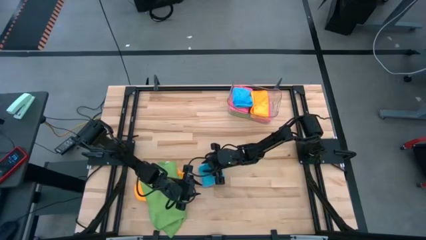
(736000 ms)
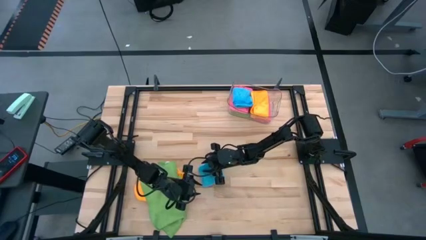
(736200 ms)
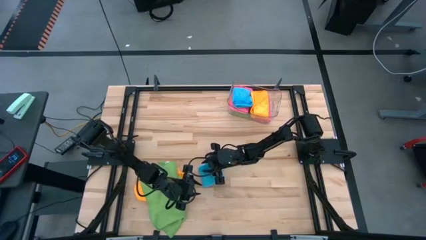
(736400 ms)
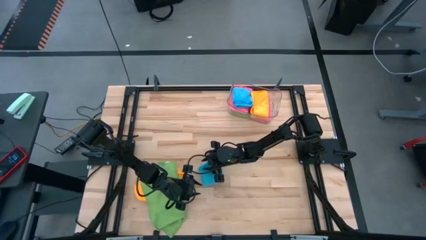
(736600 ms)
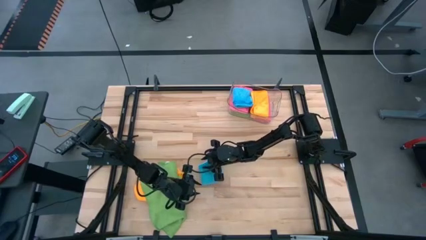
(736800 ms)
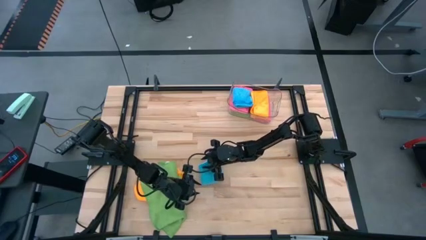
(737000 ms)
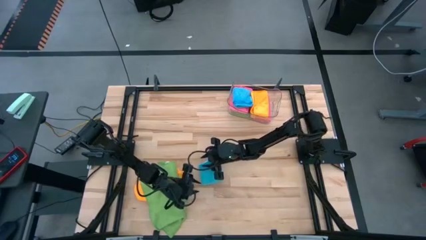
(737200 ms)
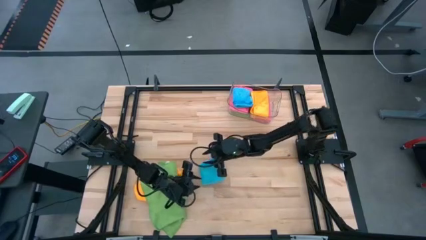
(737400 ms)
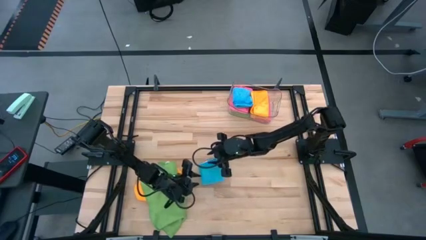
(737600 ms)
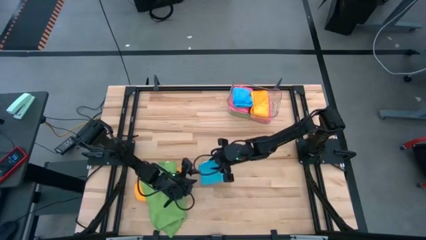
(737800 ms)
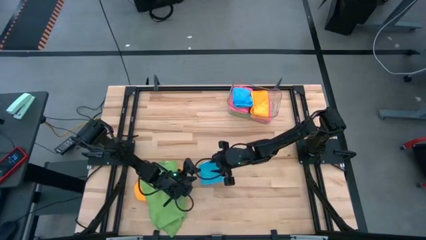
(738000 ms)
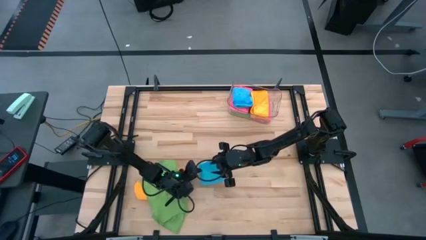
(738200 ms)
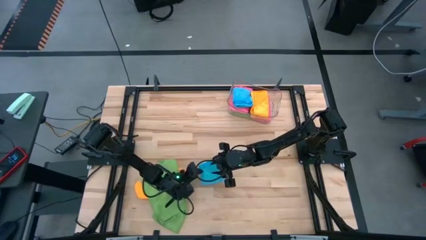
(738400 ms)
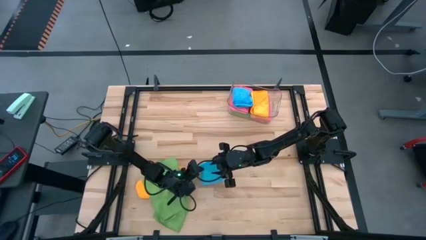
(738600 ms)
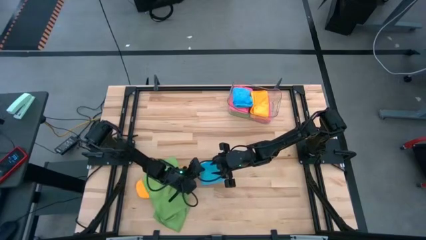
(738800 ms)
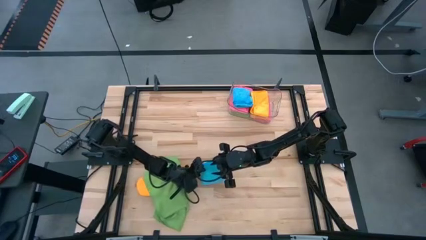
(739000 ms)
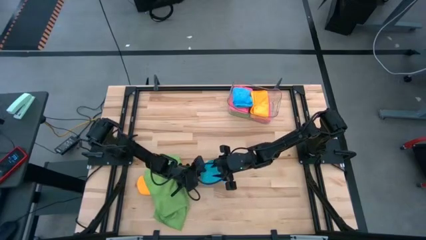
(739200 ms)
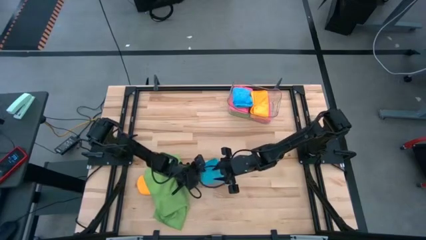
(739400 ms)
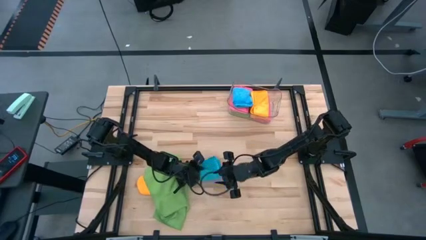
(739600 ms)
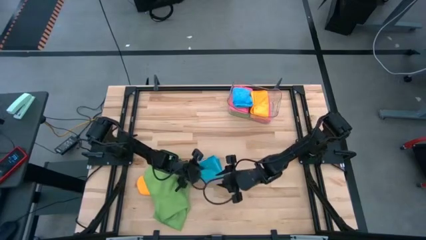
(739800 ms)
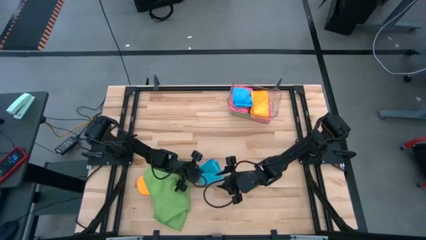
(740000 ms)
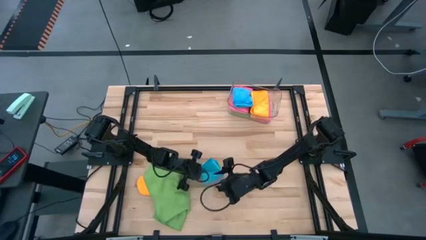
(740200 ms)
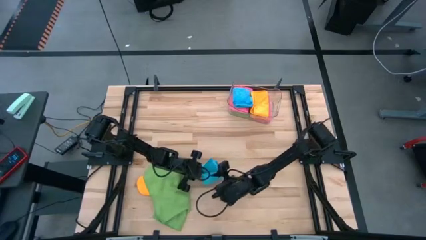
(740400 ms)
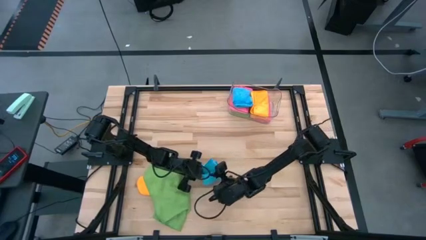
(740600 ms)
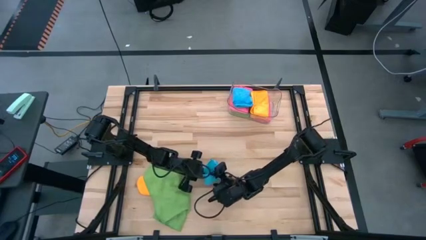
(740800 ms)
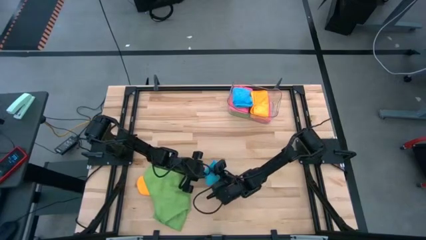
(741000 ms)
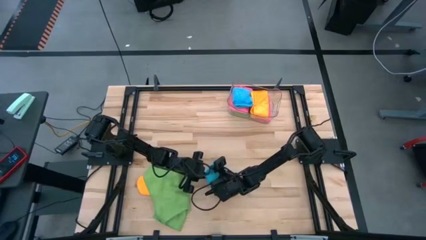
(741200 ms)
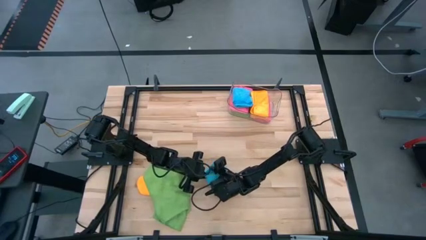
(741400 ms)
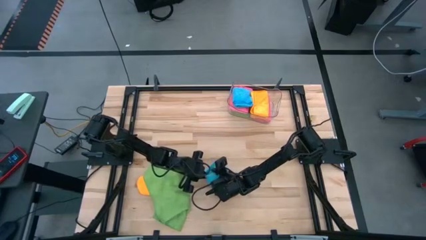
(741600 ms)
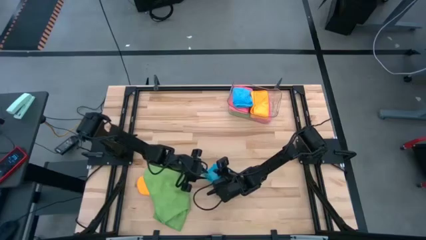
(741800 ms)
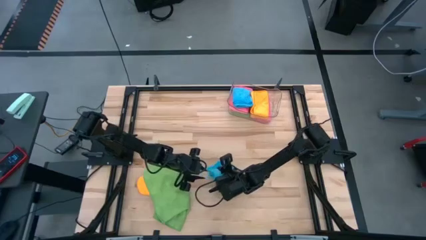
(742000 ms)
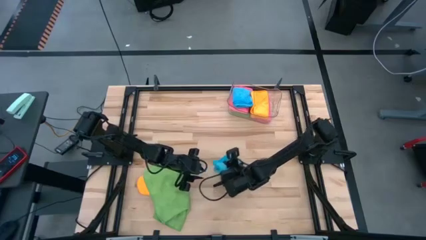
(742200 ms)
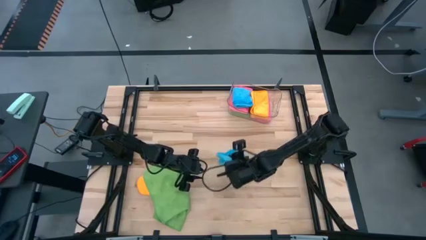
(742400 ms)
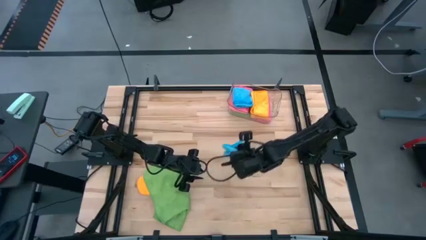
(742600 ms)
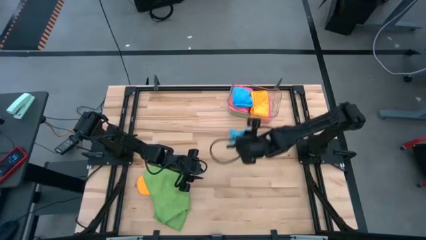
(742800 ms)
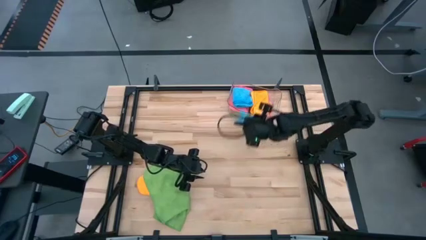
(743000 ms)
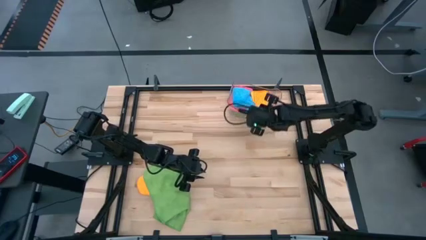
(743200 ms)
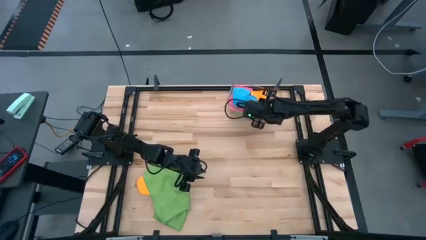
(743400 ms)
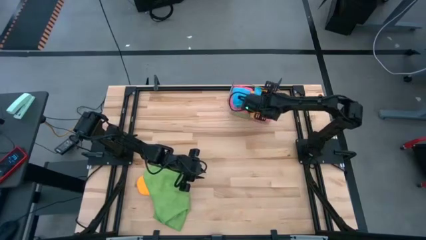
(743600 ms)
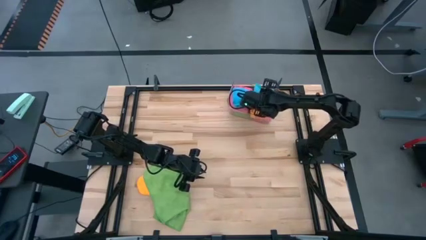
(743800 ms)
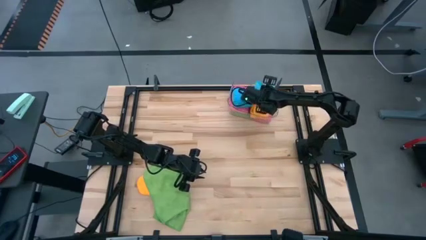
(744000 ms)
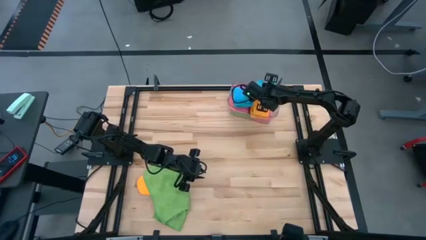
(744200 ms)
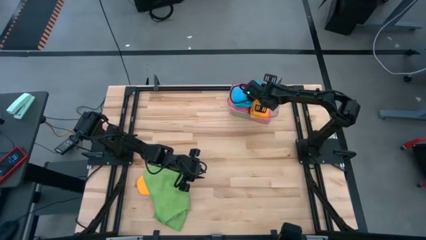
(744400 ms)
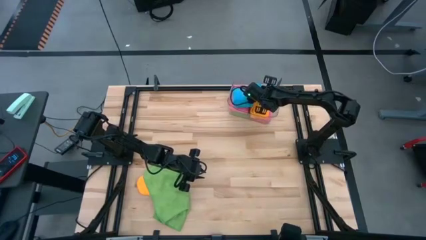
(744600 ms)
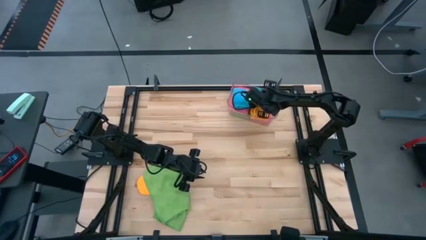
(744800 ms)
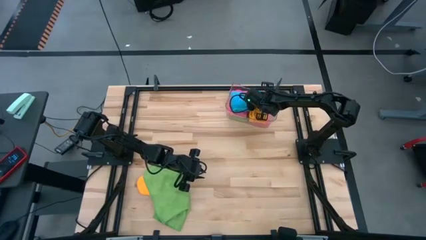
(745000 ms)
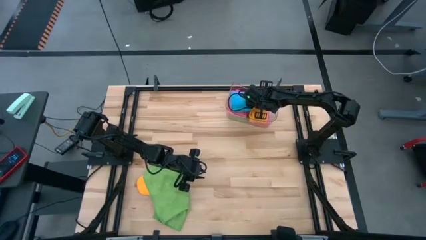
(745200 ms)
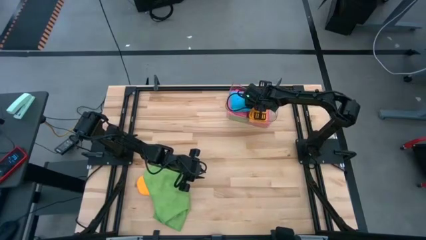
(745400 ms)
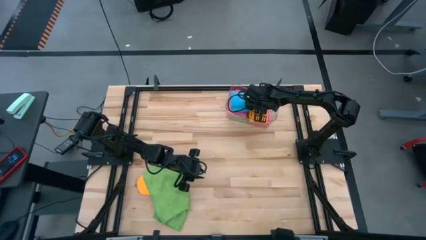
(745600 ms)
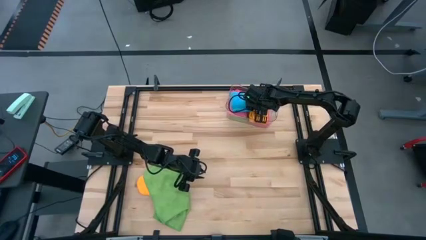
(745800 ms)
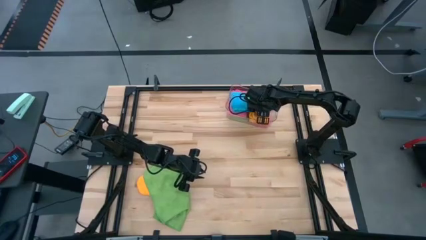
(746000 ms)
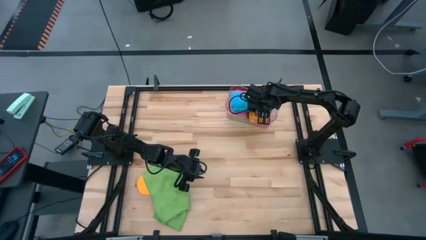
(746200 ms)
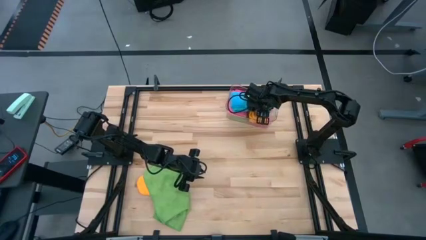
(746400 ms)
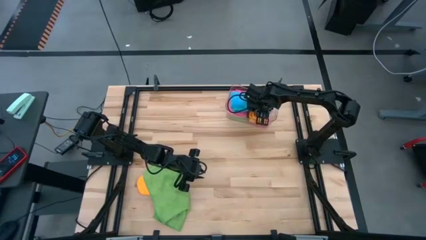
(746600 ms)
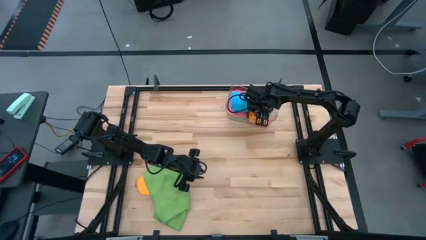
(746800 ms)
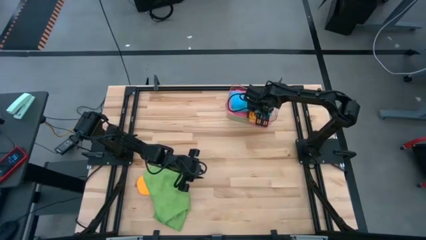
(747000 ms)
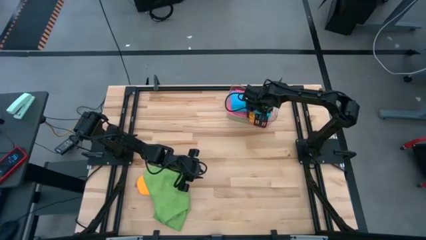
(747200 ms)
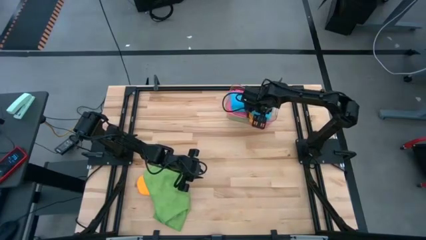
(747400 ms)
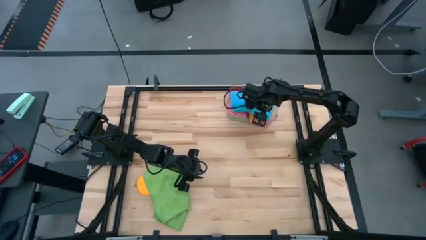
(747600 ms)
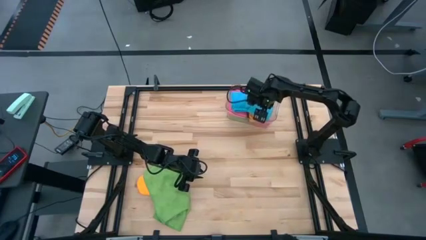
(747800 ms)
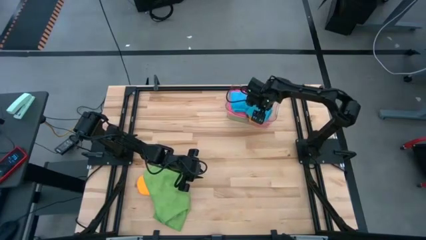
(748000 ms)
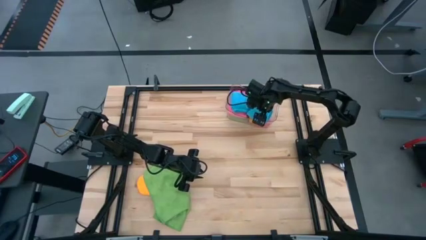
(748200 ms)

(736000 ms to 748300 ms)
Task: Fold microfiber towels
Stack the blue towel on top of the yellow towel

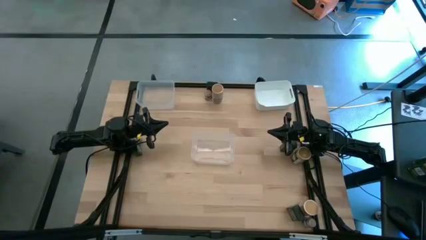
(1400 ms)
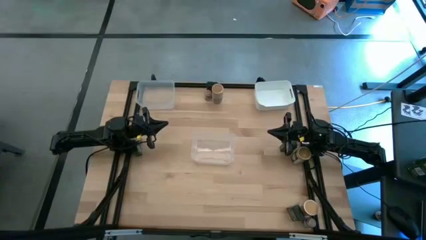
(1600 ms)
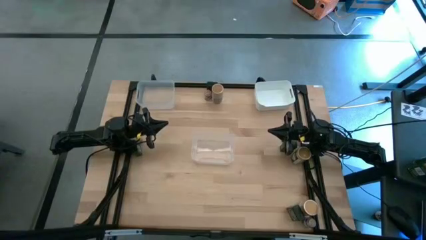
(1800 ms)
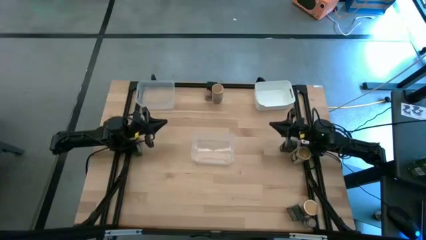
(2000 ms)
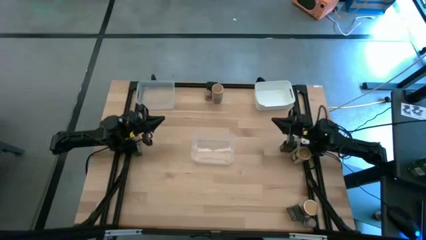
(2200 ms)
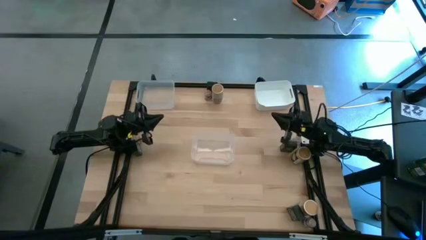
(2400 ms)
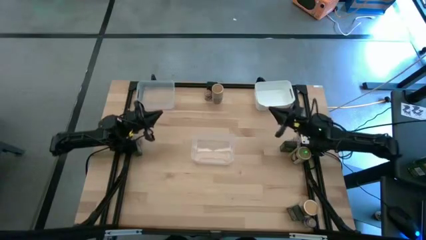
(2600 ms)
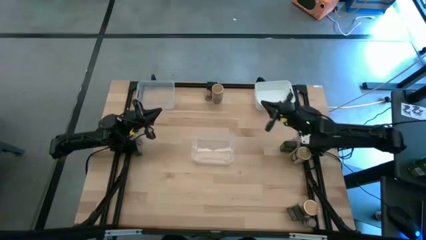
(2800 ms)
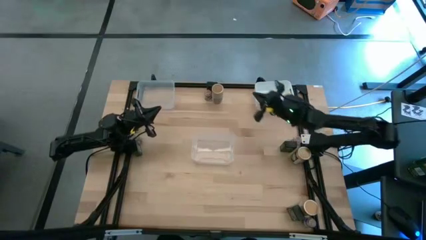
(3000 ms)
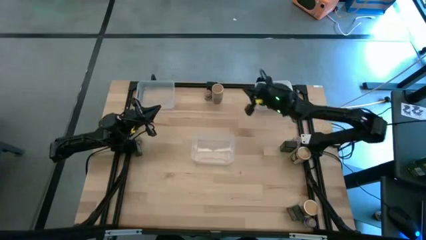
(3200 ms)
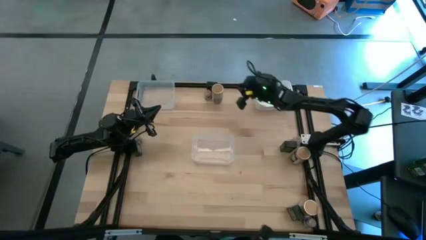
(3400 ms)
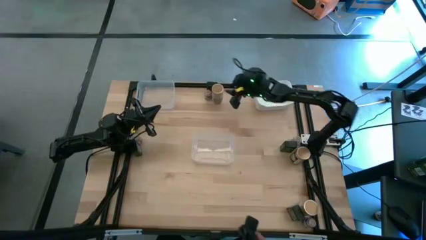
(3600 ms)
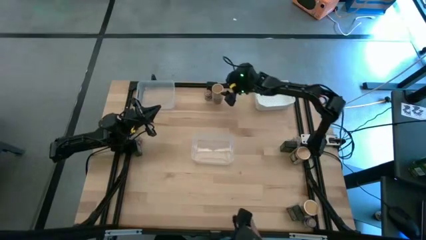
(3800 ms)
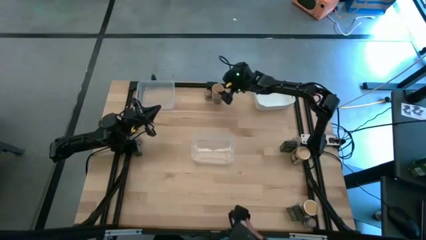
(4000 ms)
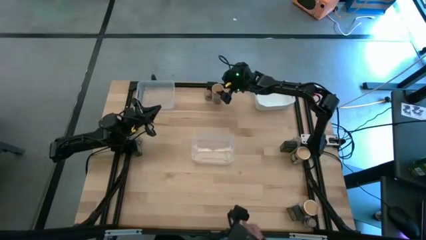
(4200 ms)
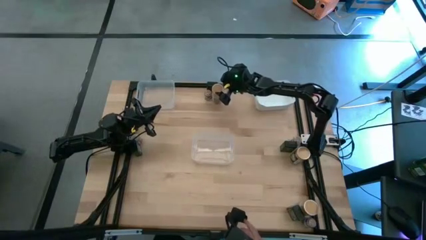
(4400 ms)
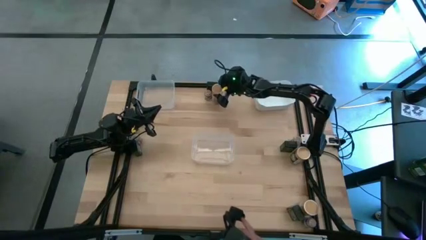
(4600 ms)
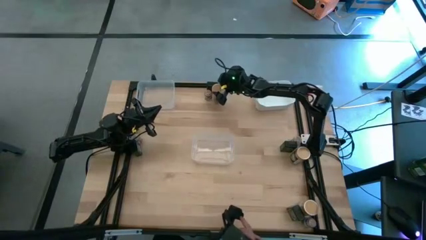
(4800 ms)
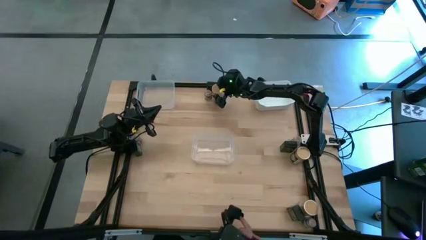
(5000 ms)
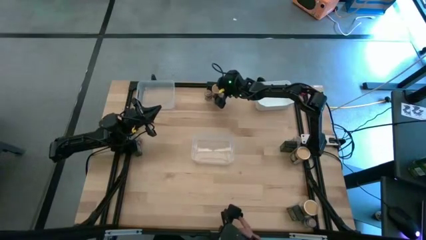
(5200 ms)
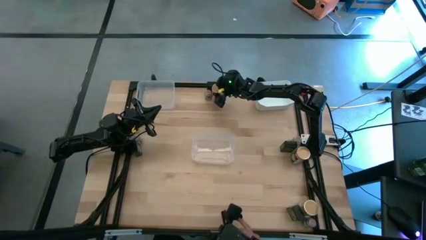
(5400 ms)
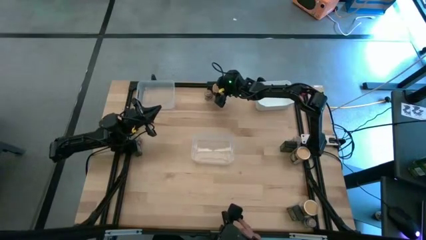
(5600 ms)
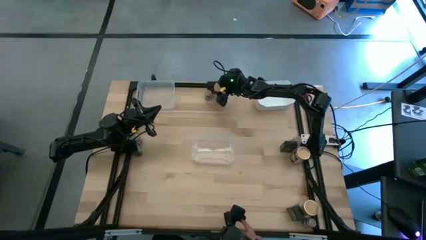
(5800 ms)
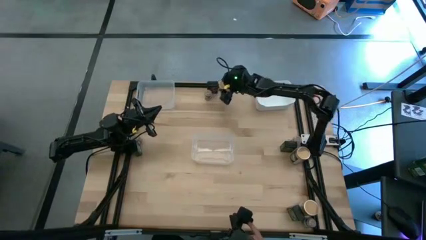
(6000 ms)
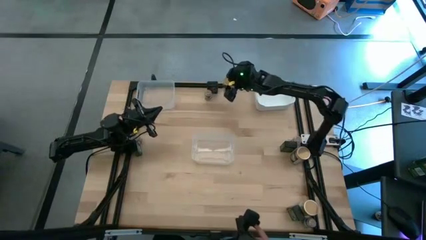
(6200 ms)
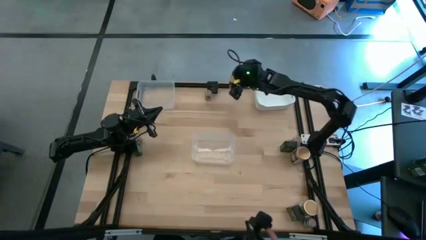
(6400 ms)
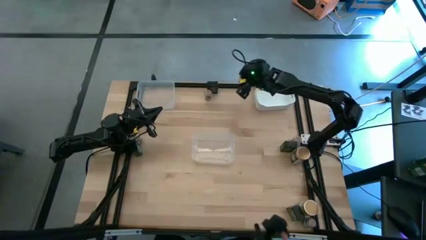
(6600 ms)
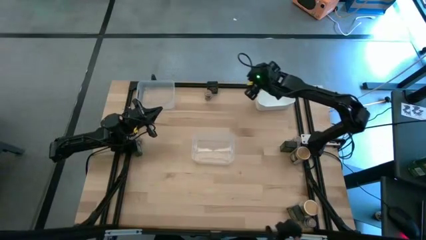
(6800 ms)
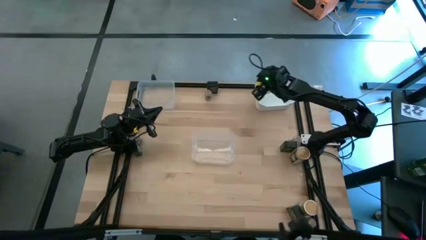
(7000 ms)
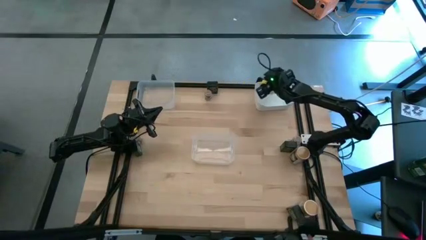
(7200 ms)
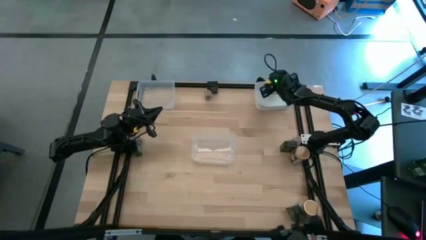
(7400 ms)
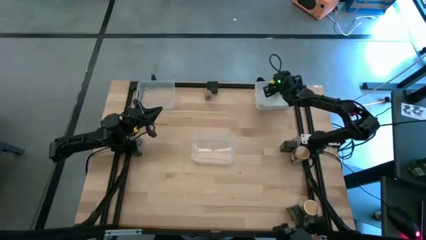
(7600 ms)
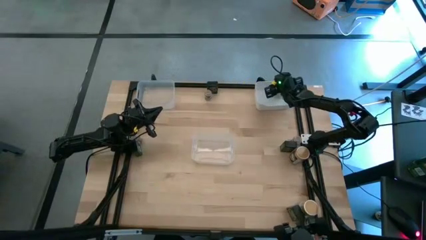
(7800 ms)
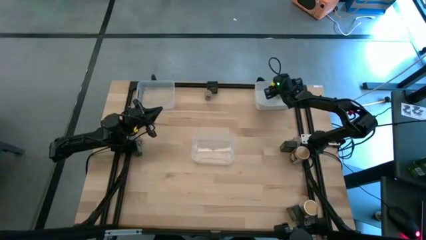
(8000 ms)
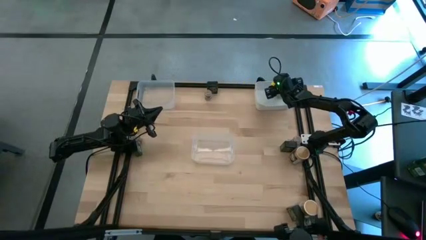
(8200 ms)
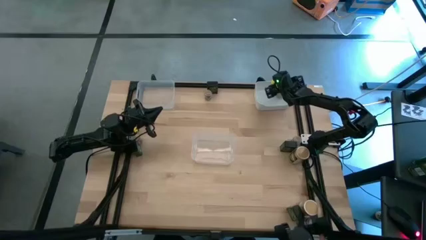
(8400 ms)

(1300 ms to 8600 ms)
Task: Sort spices by type
Put the gold seasoning bottle into the white bin
